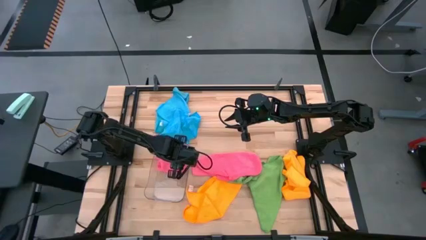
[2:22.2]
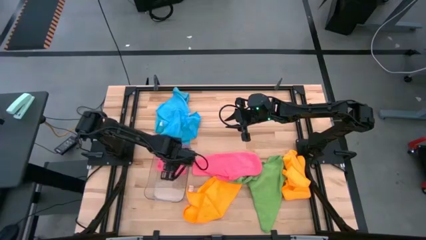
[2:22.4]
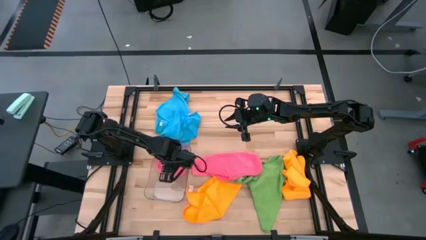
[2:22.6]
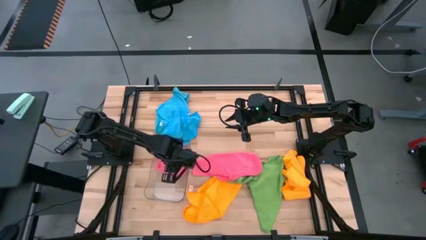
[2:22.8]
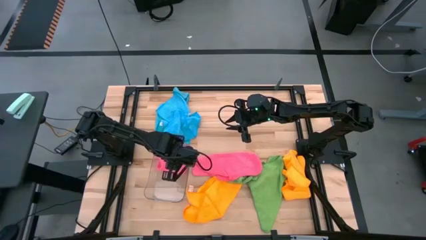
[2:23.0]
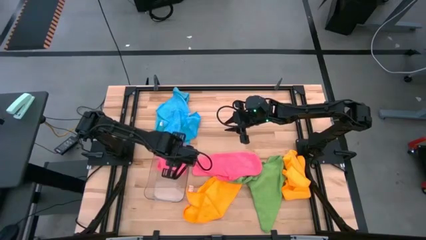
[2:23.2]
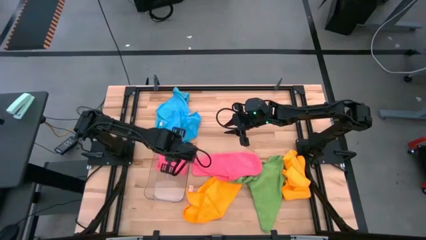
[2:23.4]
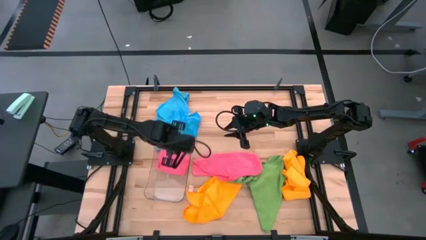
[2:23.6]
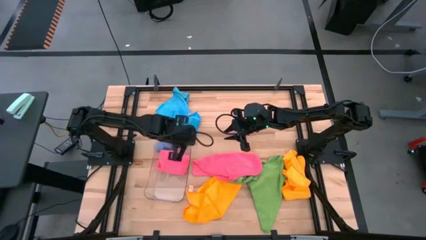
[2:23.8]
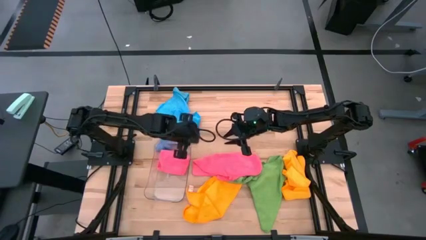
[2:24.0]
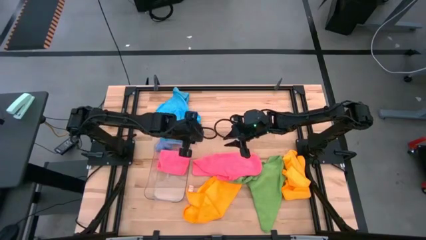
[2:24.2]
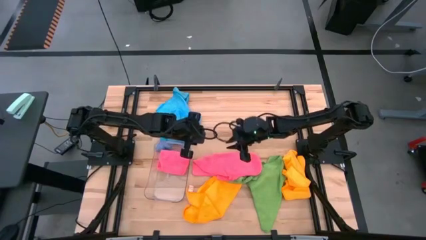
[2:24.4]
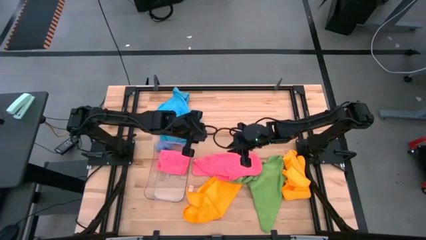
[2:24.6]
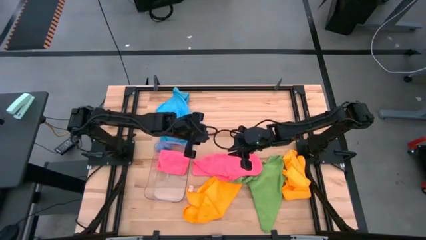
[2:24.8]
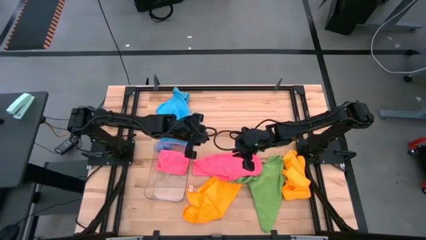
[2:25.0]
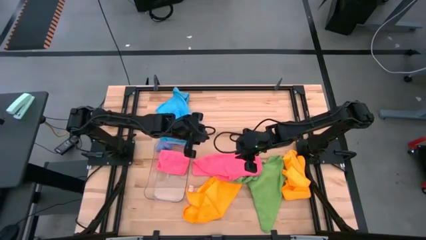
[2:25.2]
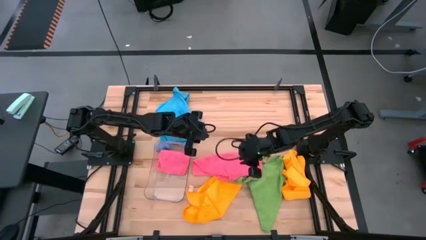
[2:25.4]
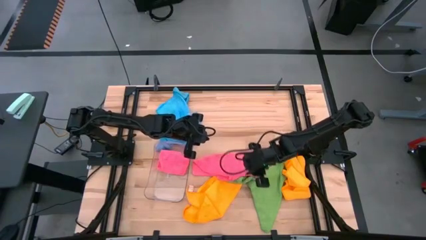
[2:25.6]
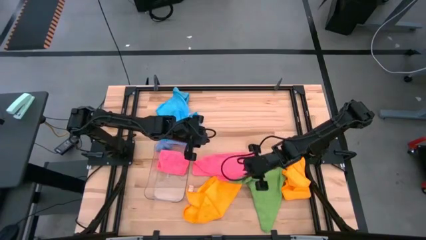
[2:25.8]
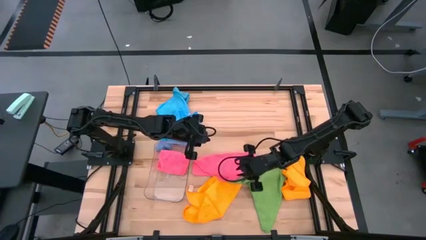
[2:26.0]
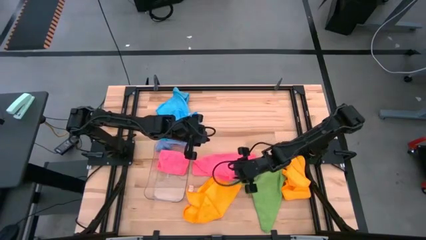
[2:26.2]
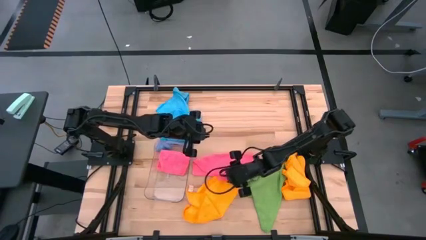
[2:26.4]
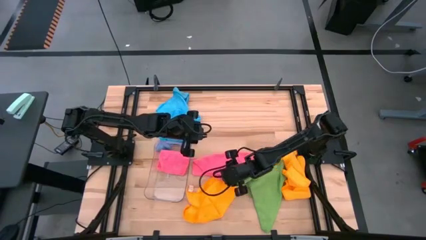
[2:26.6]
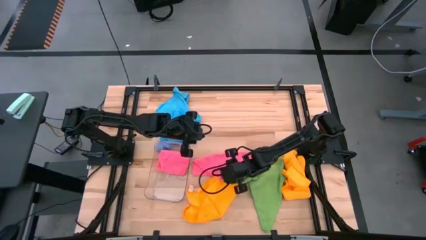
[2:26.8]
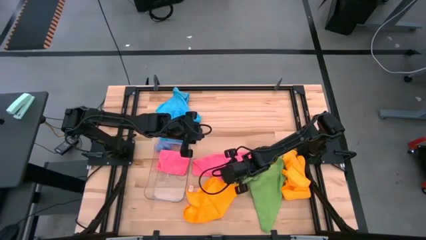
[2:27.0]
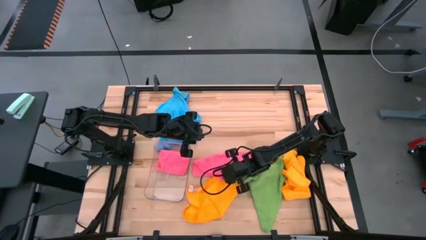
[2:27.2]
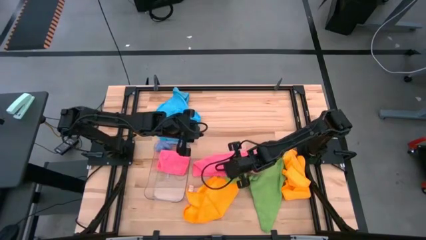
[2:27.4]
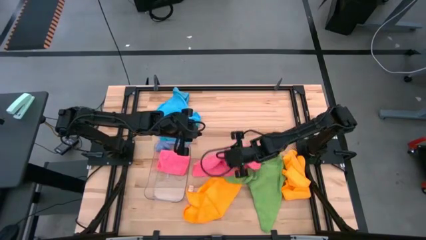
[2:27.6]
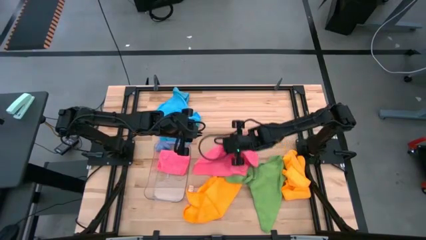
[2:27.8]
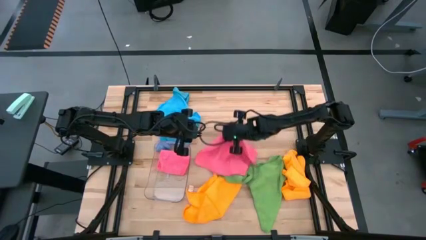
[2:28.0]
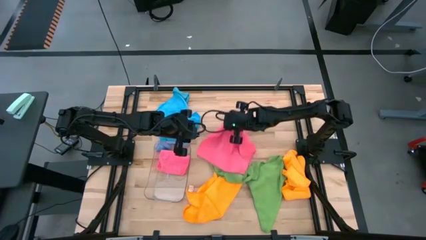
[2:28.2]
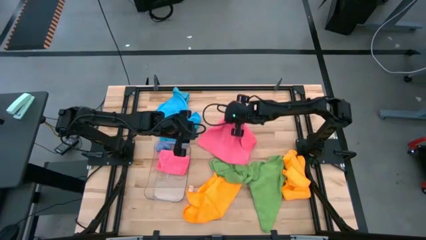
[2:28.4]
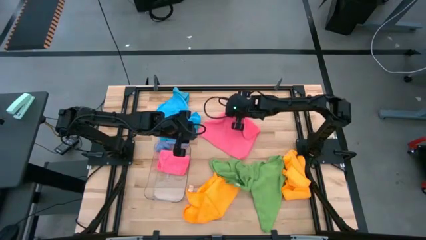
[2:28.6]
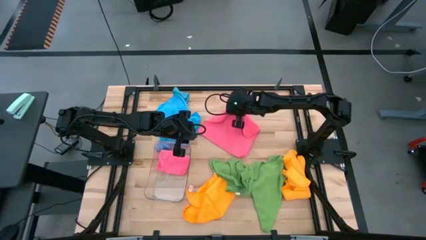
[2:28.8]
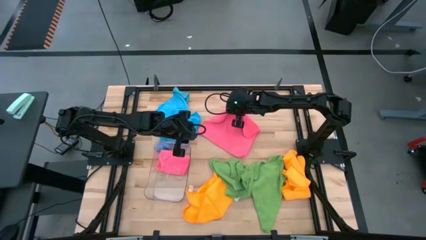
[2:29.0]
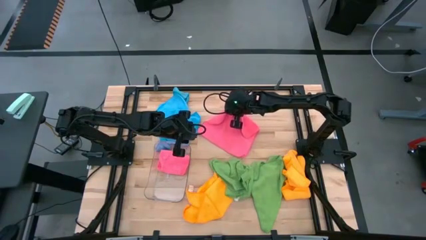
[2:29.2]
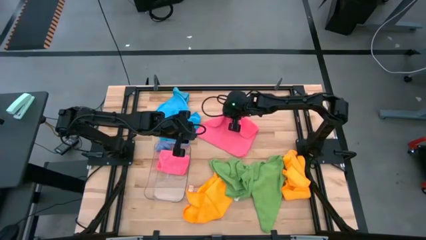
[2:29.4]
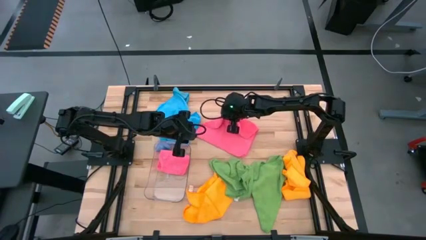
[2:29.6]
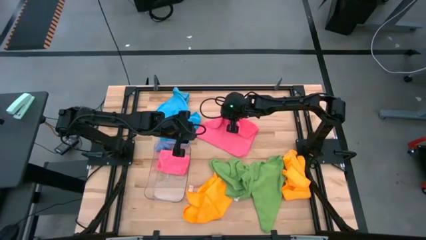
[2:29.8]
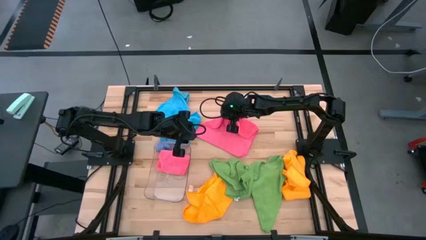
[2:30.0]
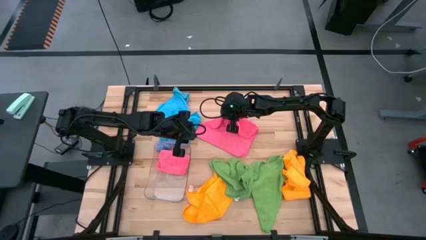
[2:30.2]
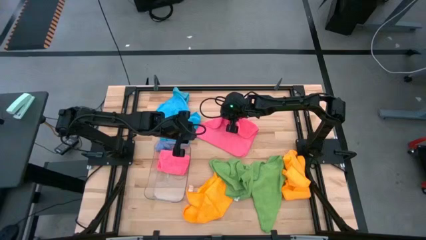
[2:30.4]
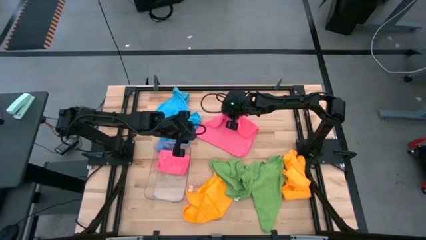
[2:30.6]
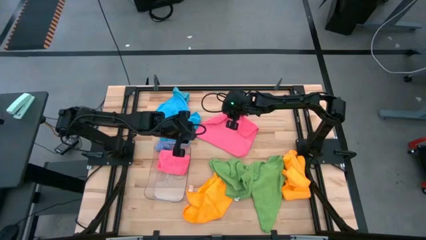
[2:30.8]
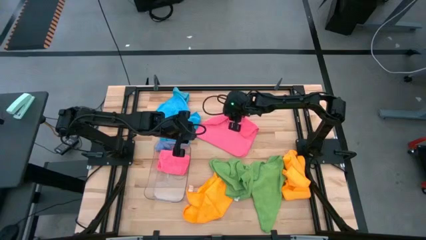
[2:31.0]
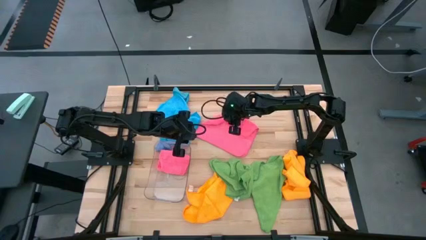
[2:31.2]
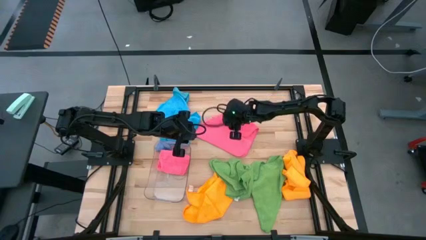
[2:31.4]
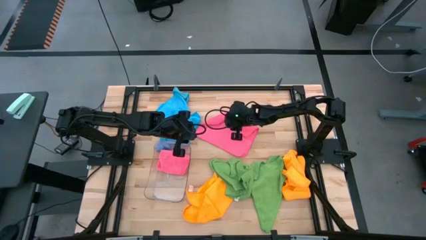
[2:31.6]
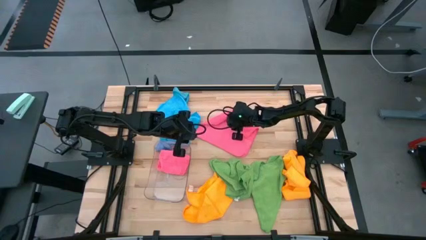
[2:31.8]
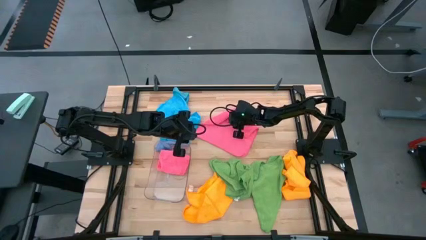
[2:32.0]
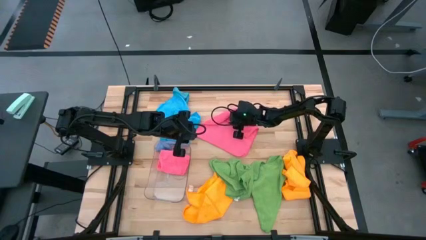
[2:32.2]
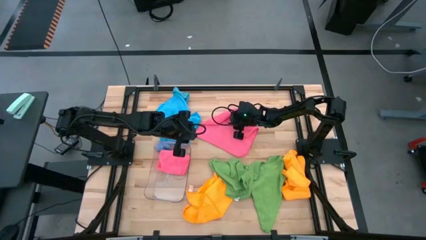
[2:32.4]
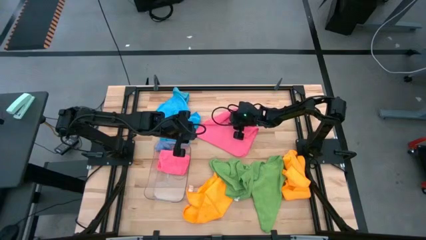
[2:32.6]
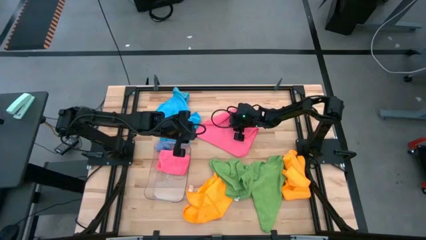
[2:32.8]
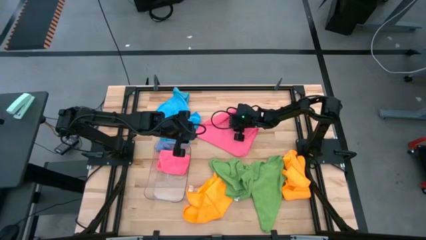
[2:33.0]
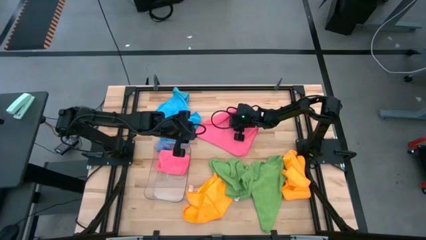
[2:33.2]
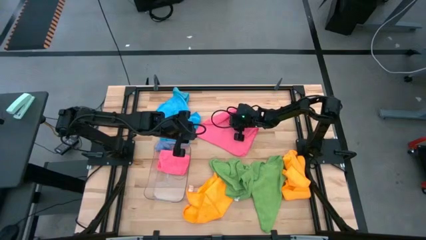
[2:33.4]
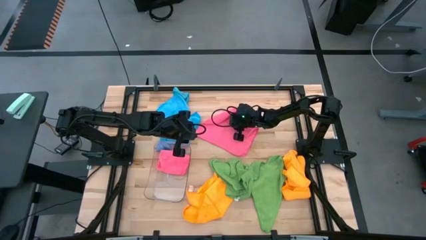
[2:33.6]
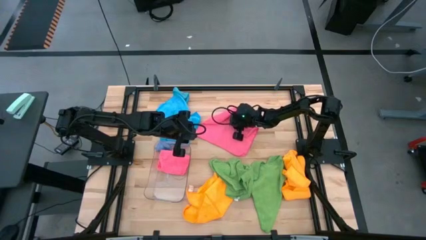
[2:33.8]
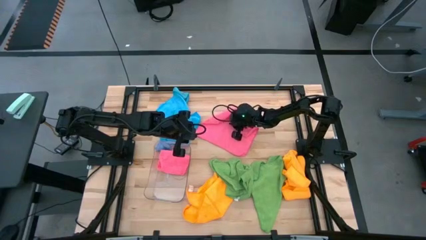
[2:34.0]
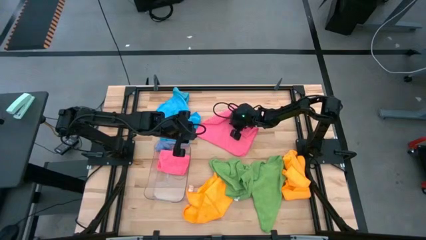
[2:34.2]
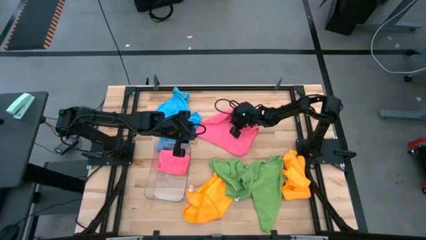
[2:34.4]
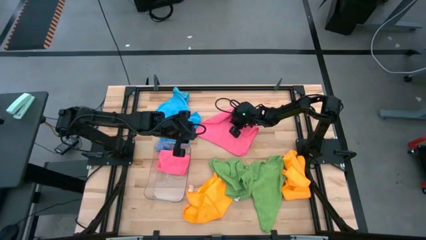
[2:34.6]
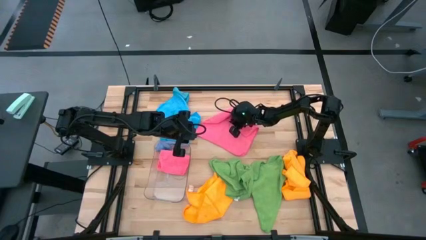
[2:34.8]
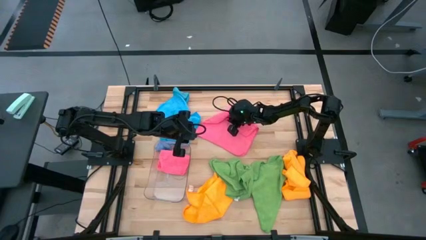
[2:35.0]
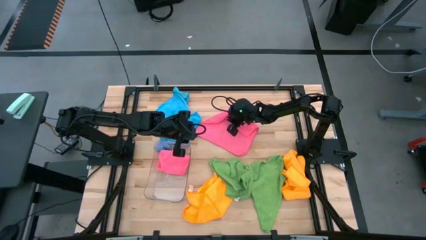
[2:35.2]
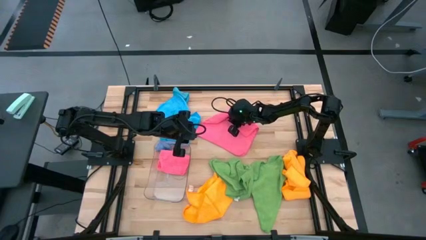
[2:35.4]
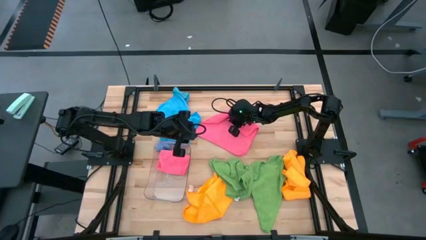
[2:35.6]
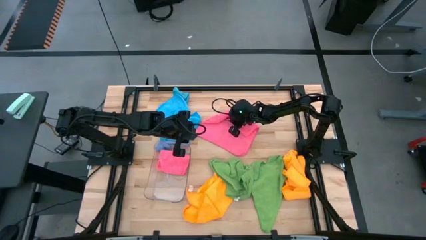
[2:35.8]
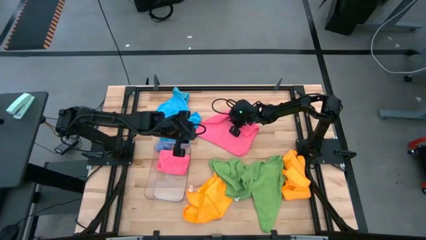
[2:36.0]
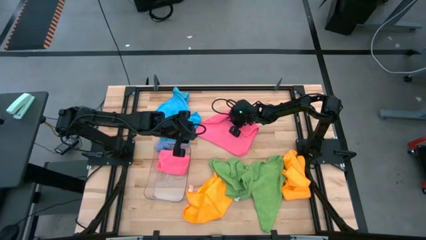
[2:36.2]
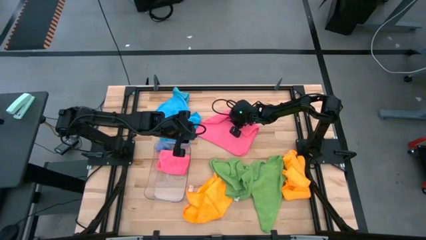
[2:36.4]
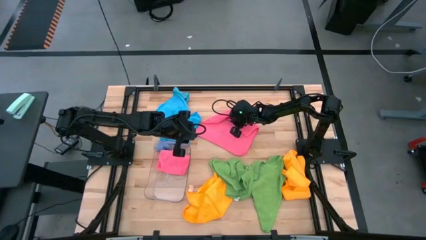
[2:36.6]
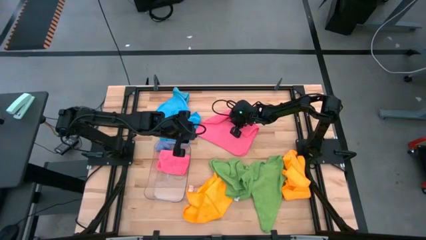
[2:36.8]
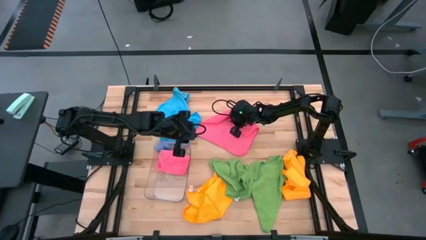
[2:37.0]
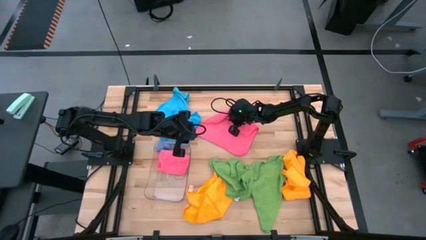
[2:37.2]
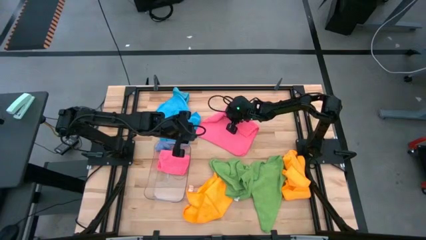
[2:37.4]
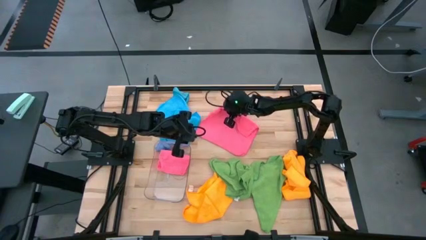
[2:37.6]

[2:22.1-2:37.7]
Task: Fold microfiber towels
Fold the pink microfiber cloth
